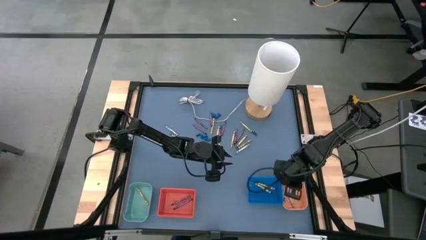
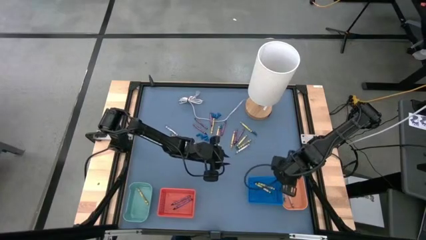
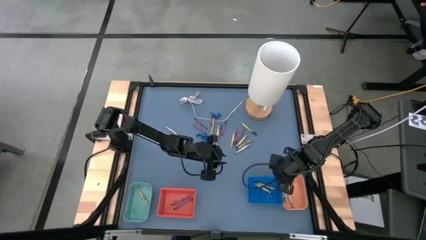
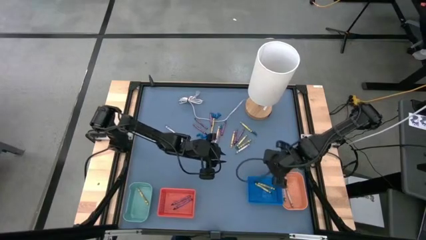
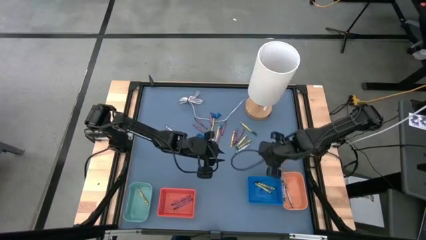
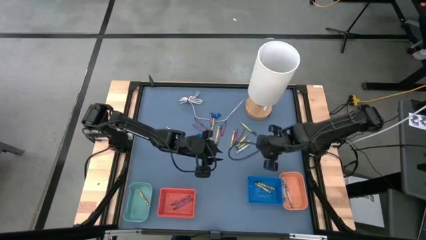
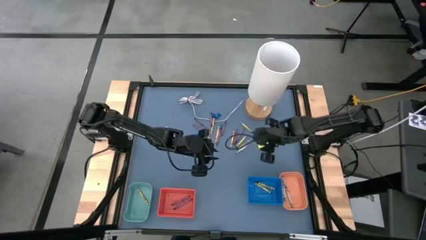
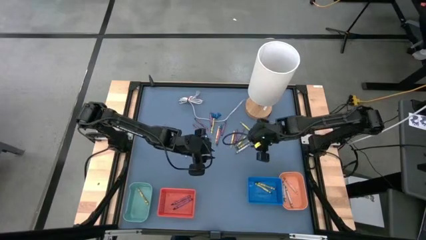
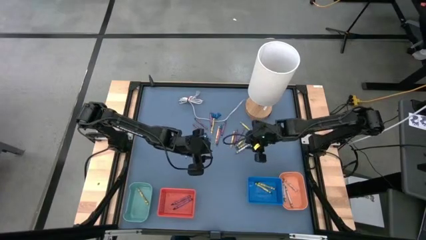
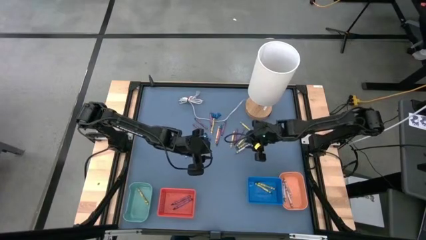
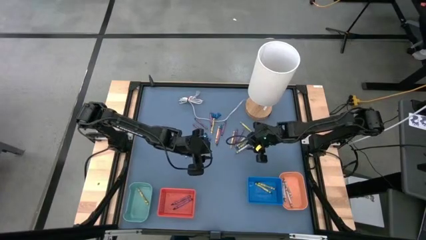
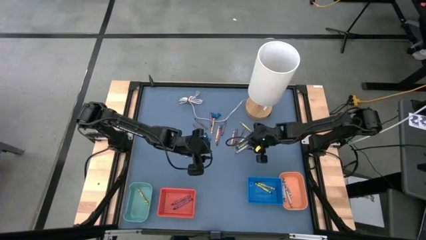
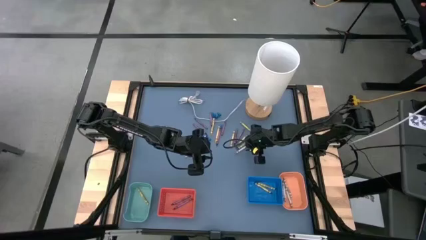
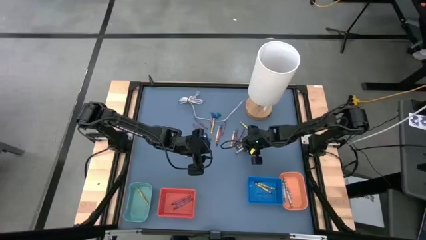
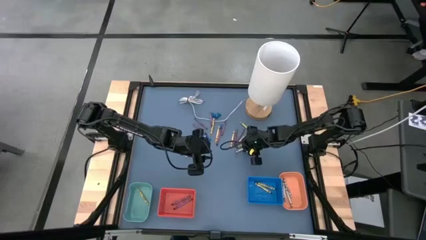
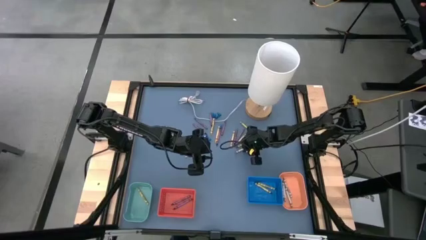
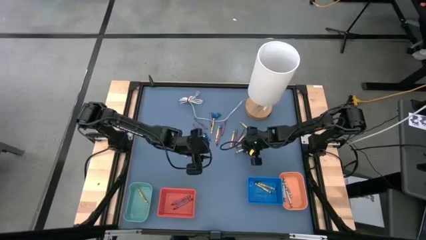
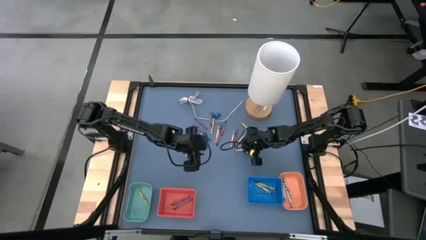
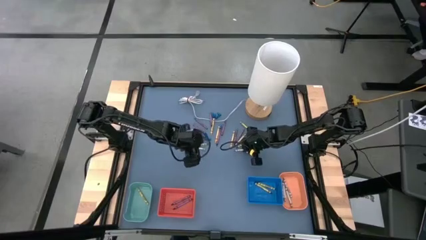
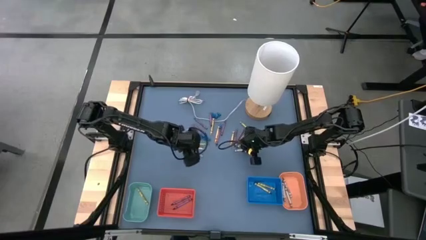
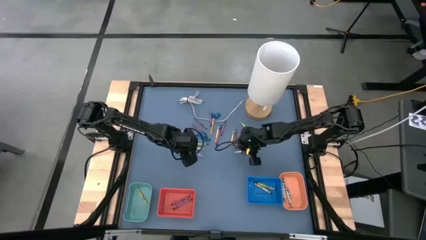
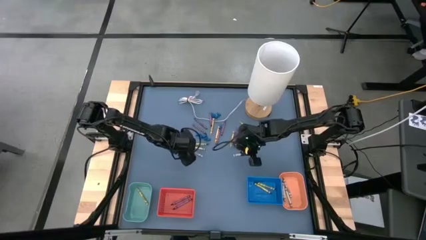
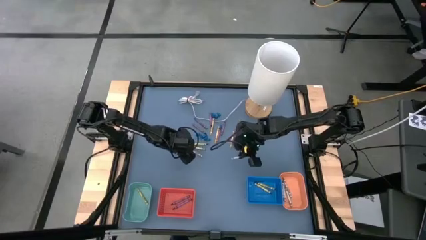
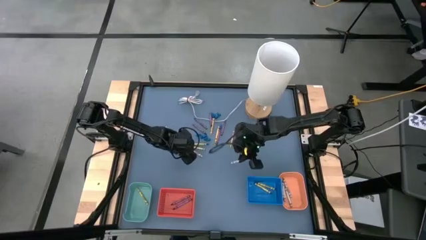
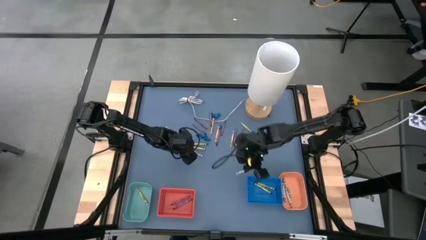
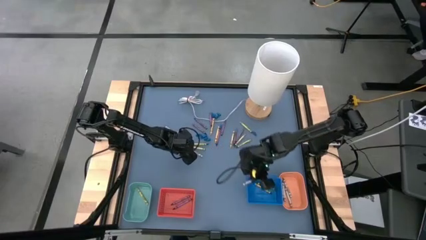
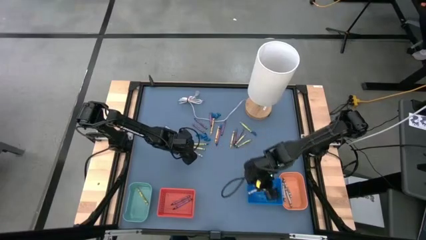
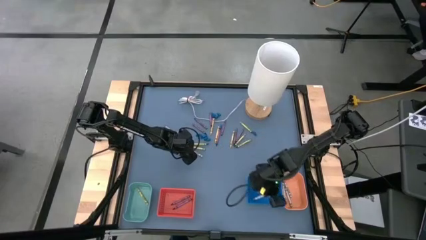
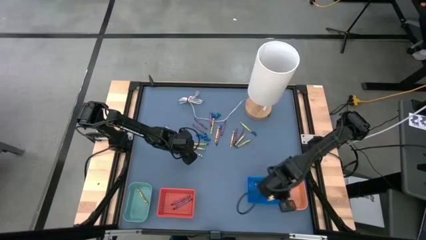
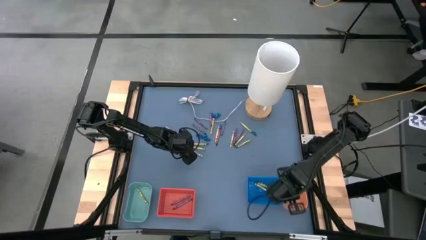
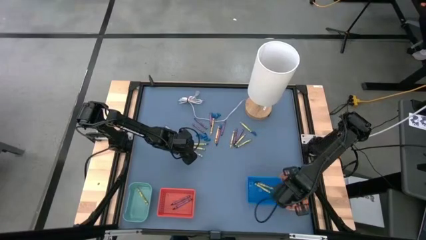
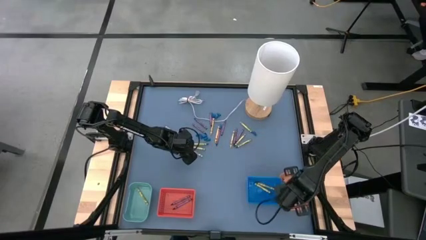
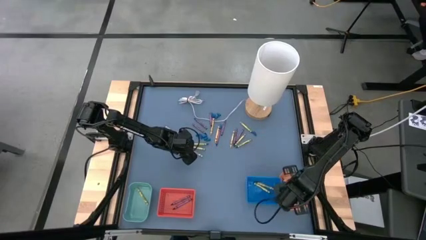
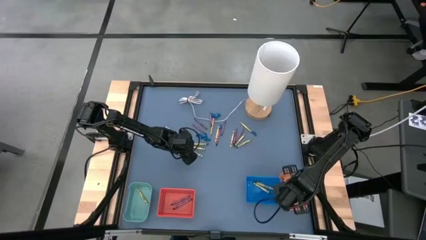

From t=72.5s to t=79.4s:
Task: Sort crayons
Put the gray crayon into the orange bin

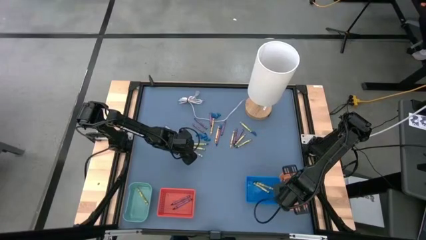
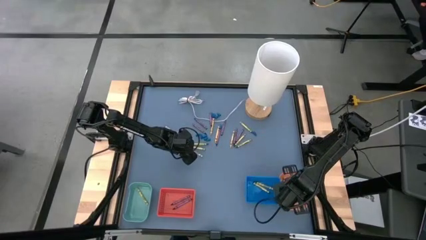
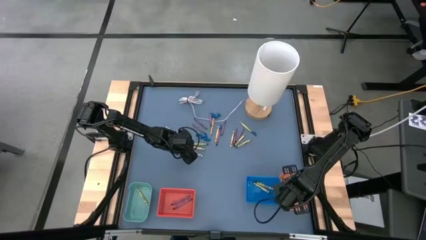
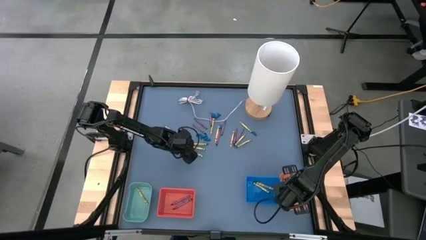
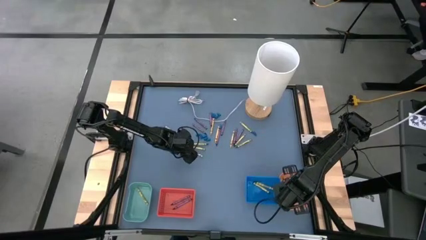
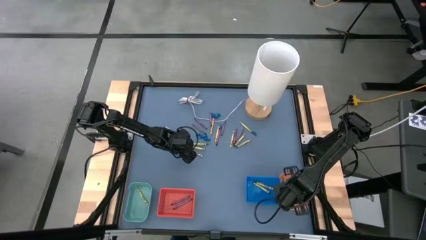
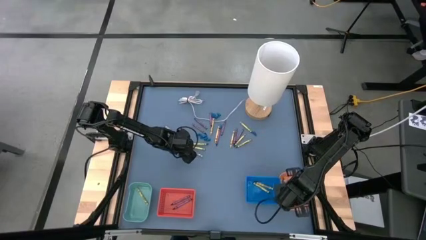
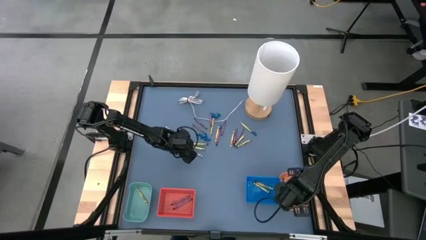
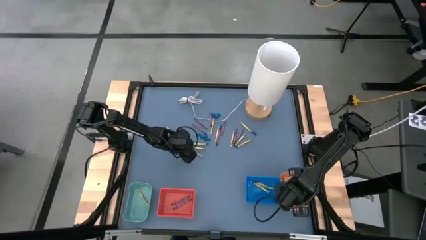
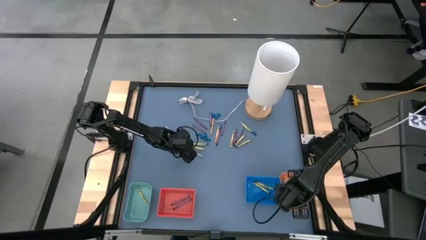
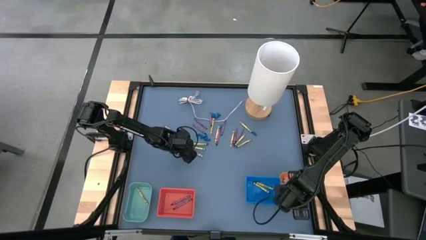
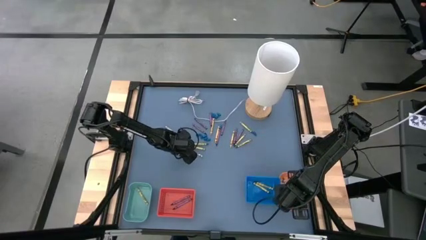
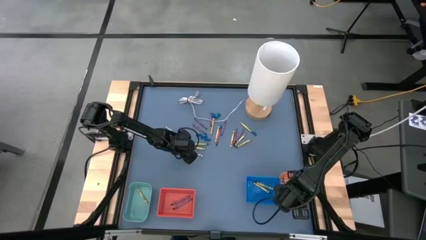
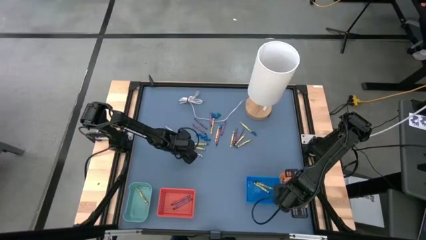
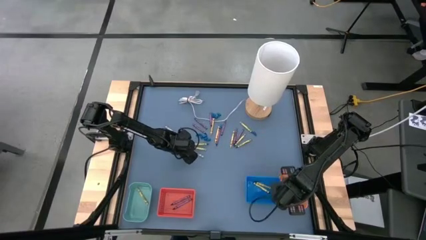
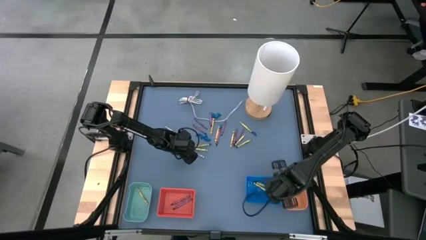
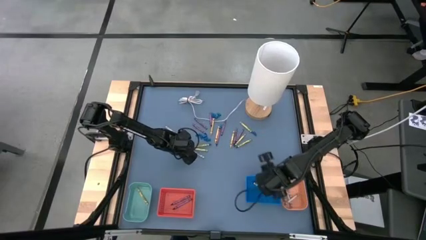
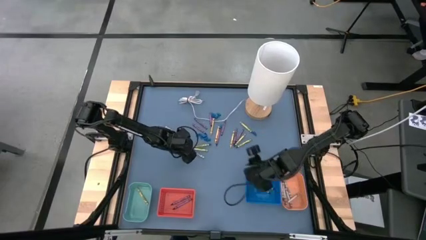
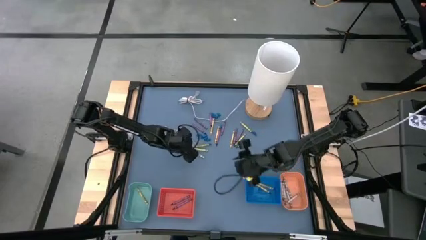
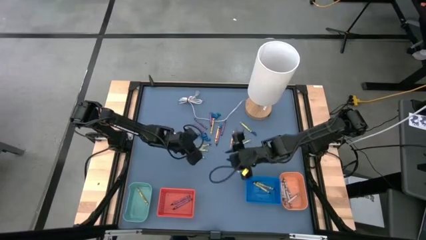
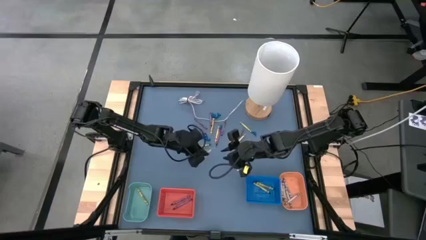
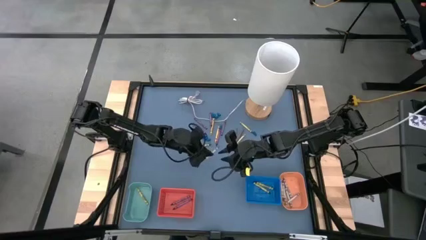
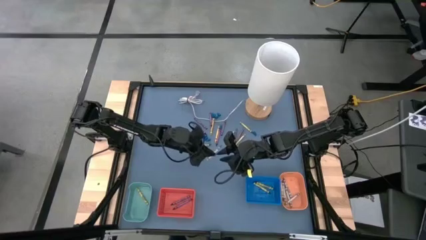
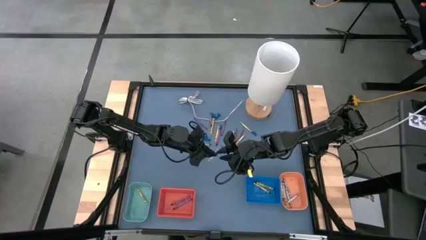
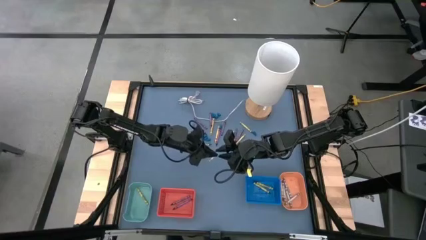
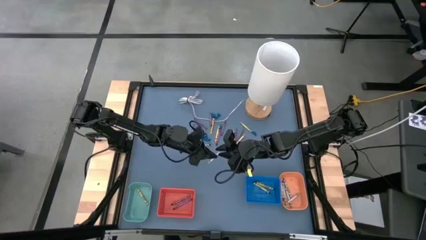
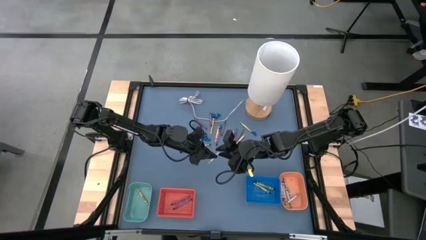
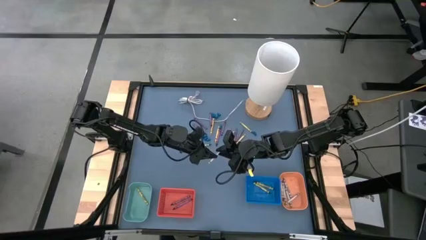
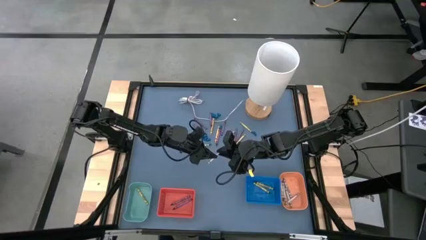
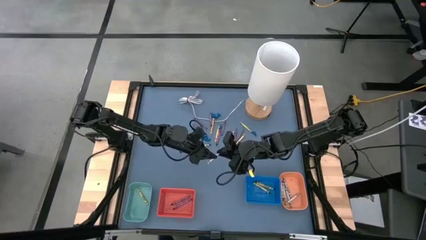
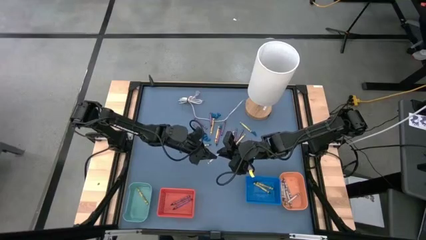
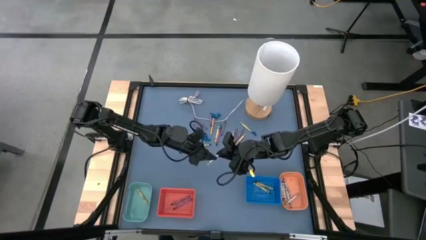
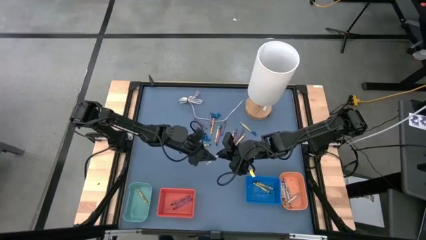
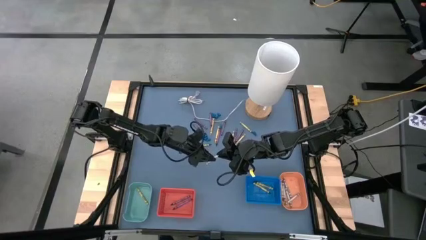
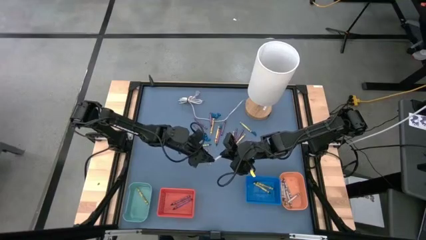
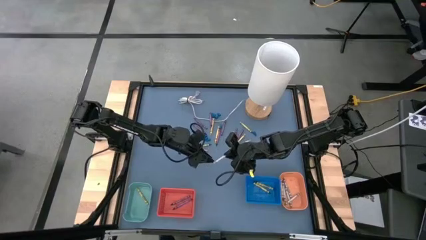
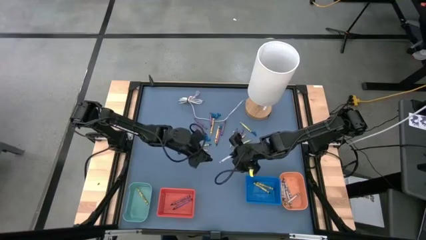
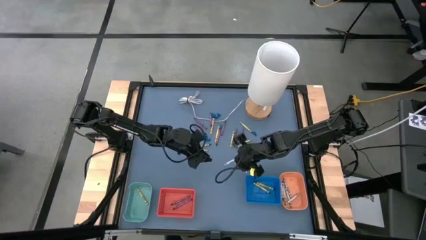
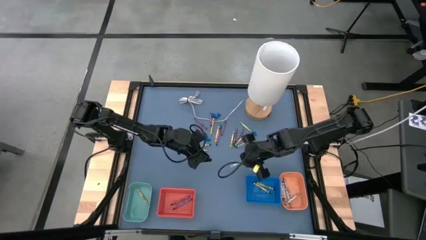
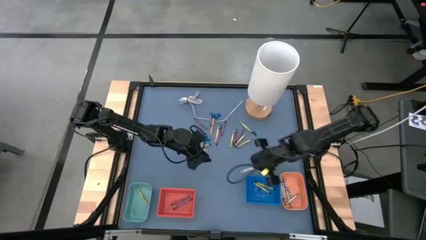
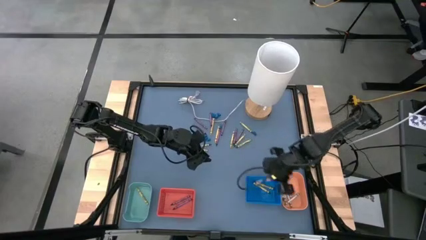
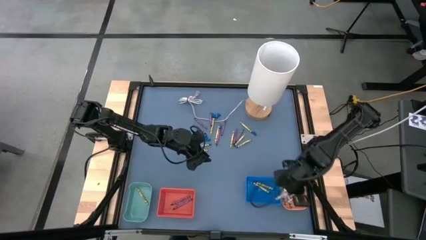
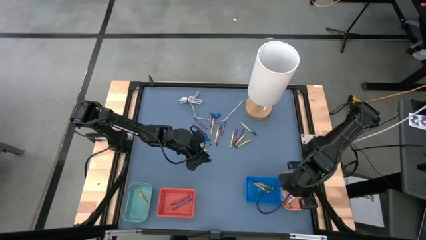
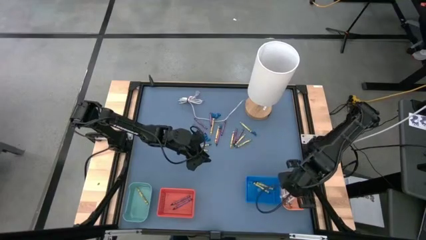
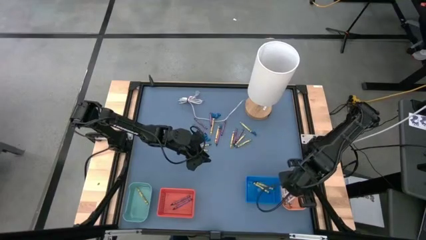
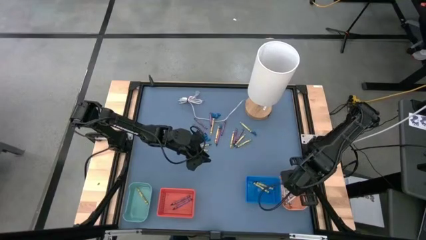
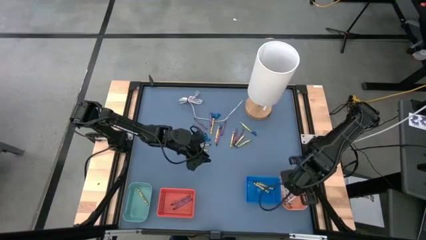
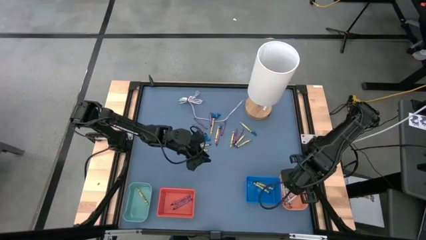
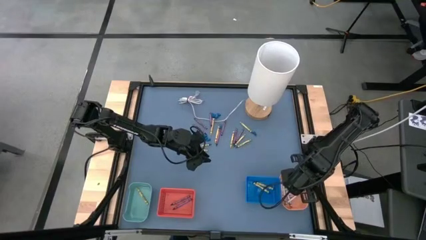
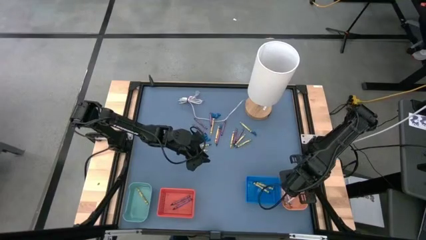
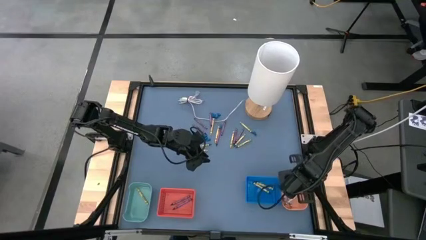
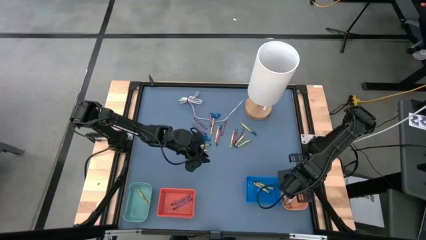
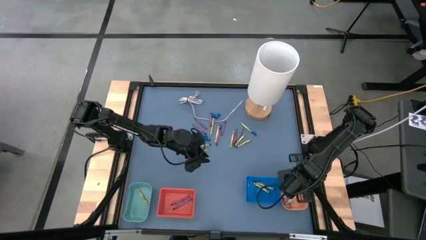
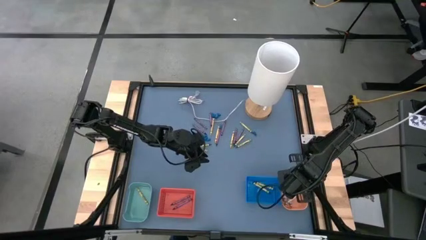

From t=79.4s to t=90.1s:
Put the gray crayon into the orange bin
